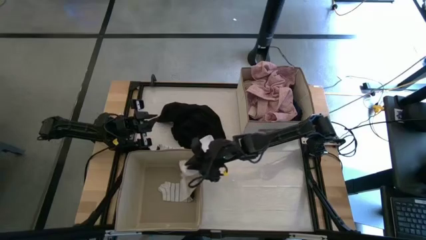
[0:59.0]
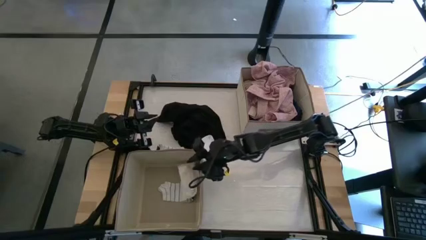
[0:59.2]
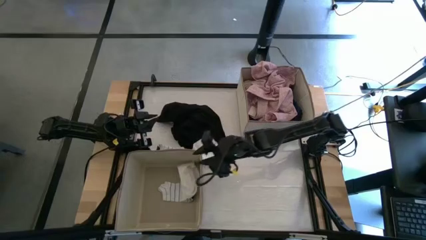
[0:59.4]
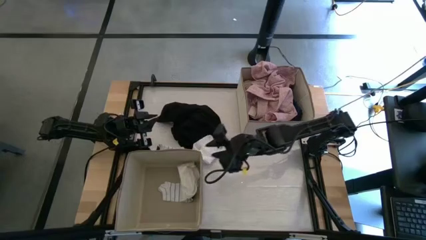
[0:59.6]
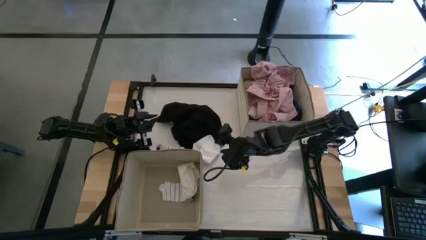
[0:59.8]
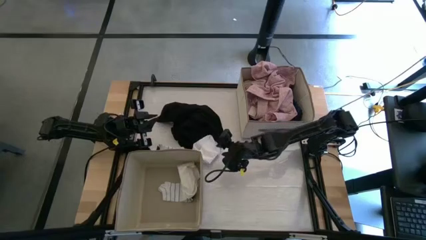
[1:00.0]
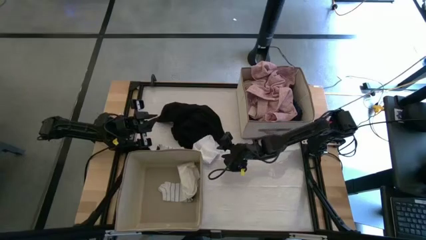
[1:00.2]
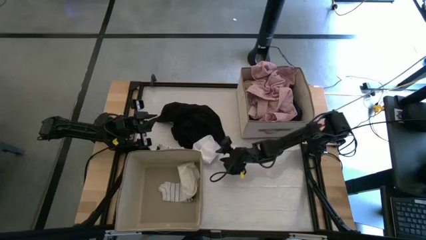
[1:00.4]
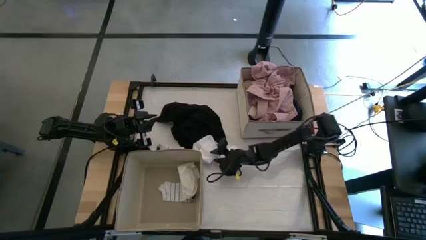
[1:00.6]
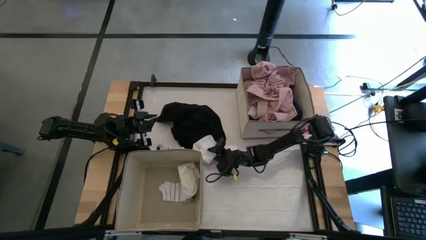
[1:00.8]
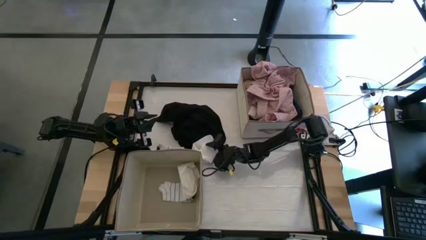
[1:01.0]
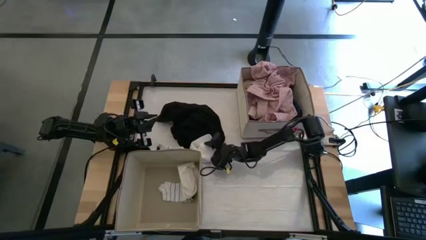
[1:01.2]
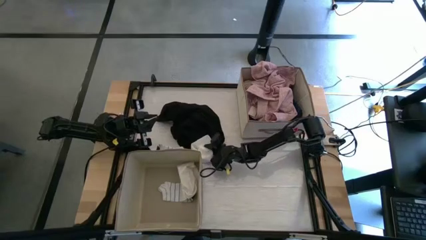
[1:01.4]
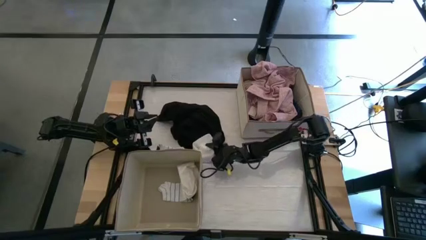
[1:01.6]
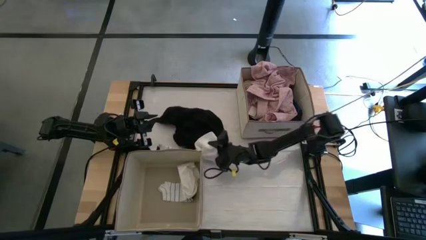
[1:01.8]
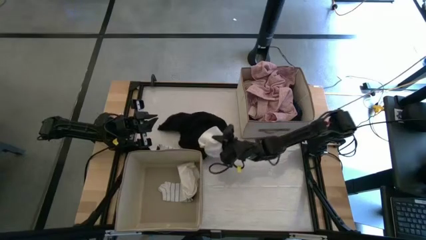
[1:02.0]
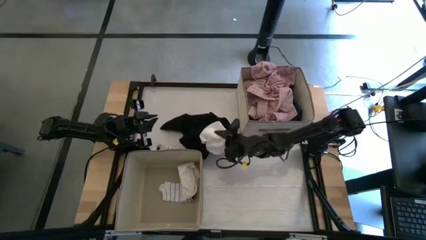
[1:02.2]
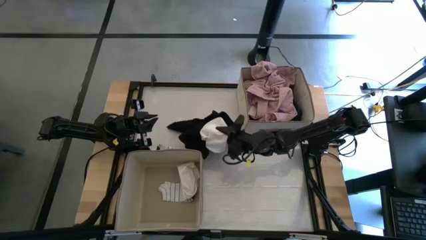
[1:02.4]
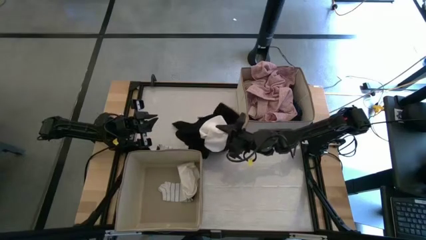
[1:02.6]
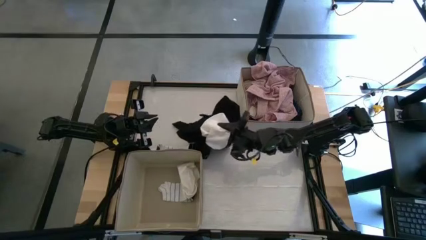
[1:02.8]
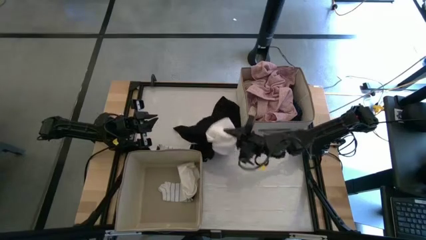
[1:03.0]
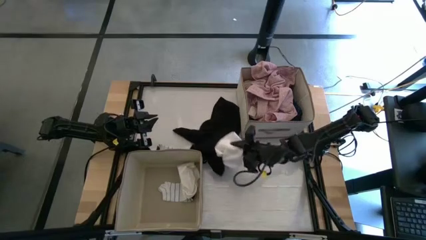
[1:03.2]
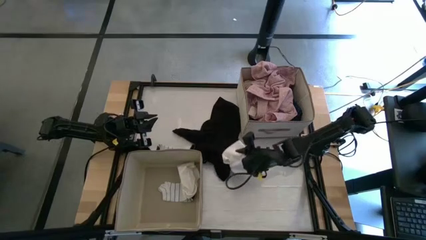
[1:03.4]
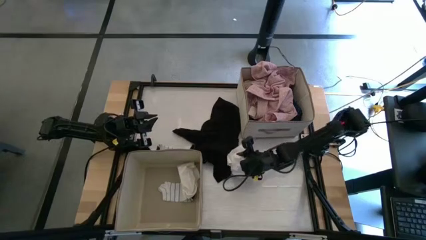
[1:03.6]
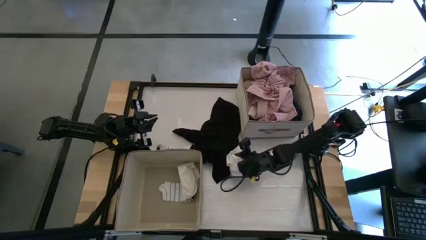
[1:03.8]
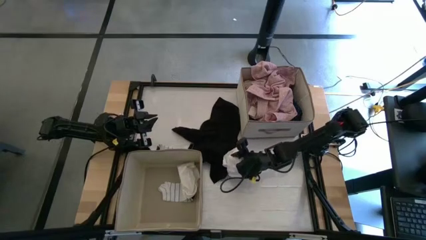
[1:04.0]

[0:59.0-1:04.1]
Task: Sort clothes
Put the white sock into the left laundry organizer

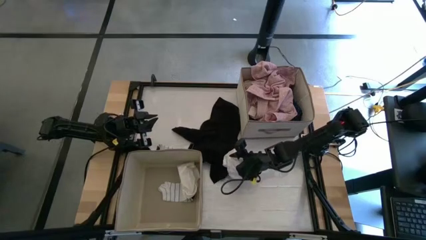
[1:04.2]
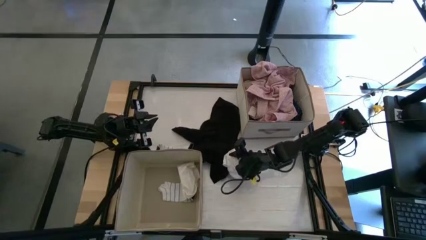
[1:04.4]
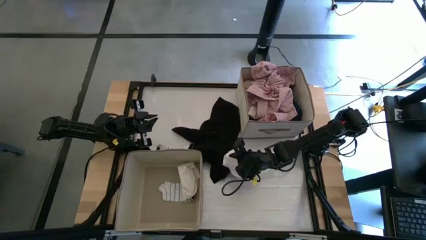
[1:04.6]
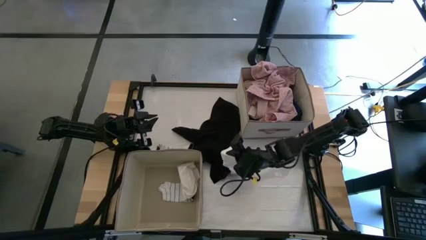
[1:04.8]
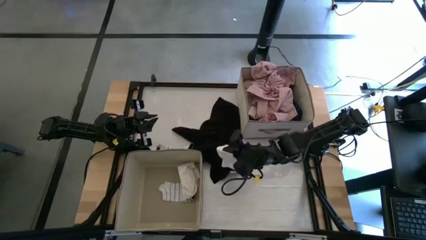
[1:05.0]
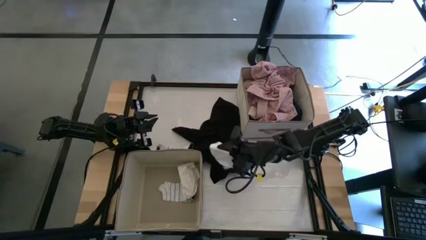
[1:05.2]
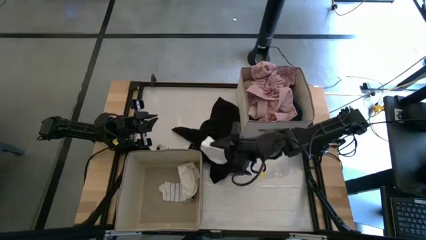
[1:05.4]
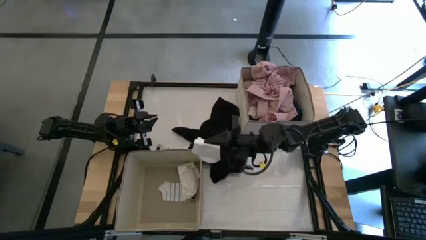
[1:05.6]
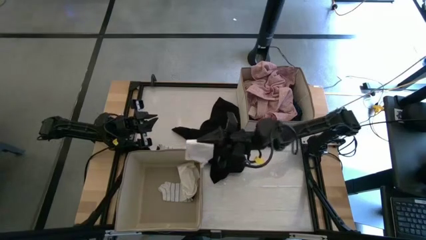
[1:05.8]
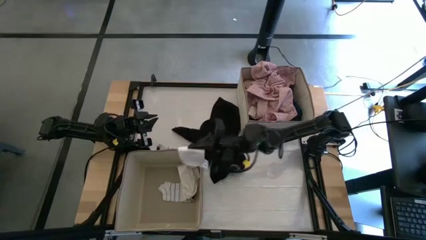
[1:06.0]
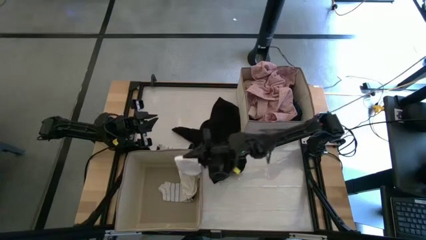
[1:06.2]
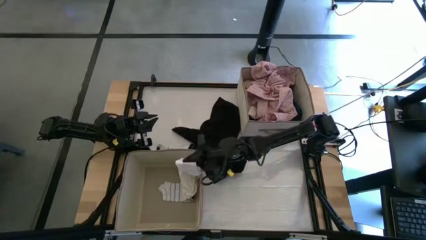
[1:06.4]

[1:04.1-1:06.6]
Put the white sock into the left laundry organizer

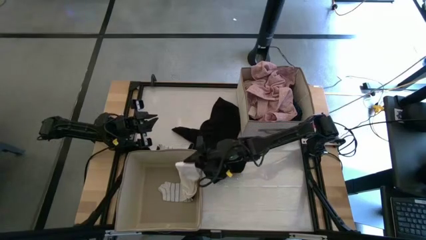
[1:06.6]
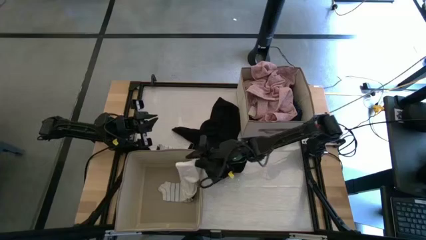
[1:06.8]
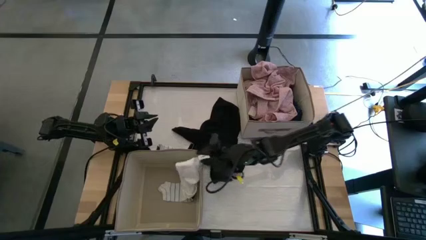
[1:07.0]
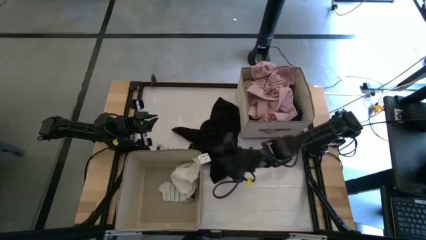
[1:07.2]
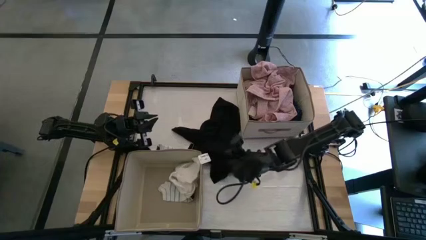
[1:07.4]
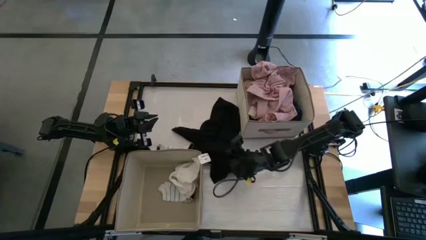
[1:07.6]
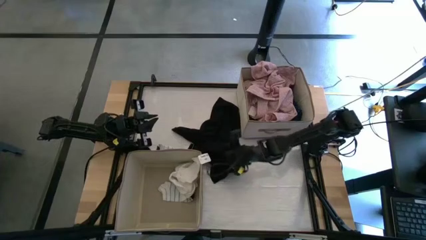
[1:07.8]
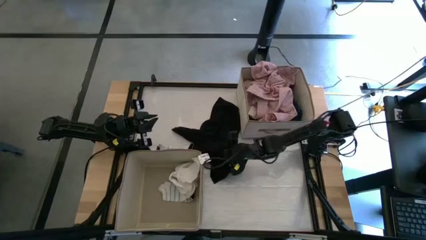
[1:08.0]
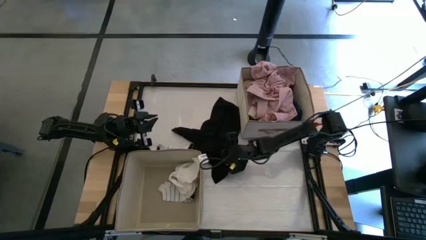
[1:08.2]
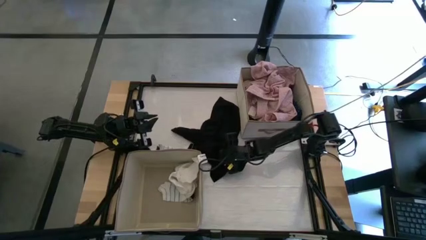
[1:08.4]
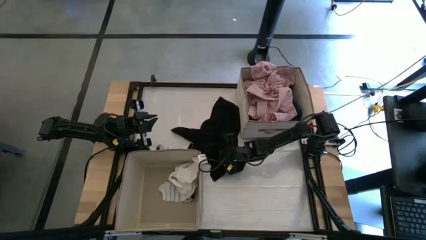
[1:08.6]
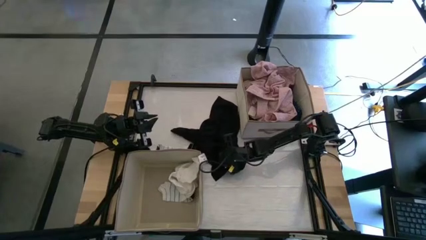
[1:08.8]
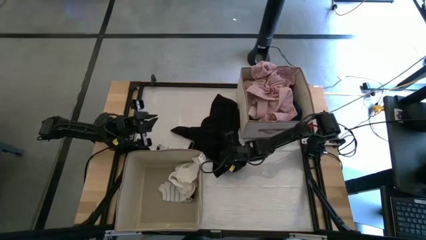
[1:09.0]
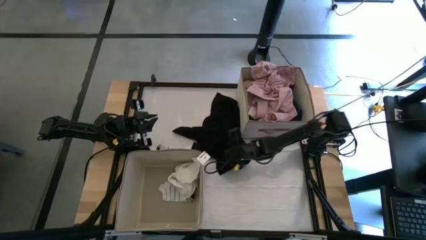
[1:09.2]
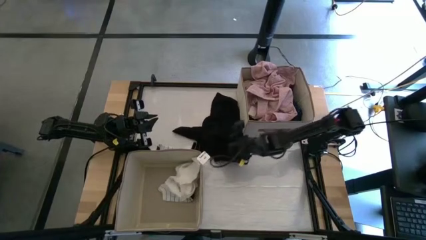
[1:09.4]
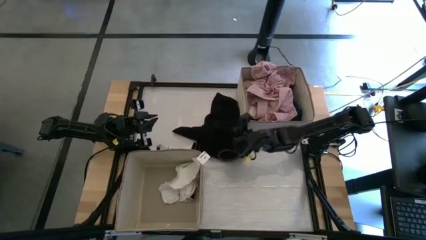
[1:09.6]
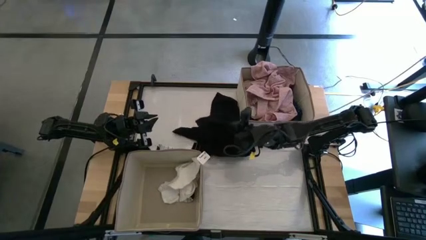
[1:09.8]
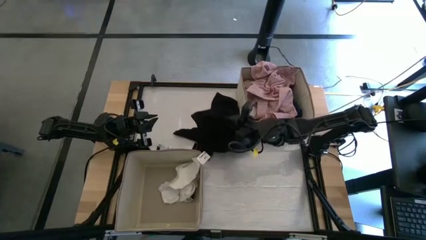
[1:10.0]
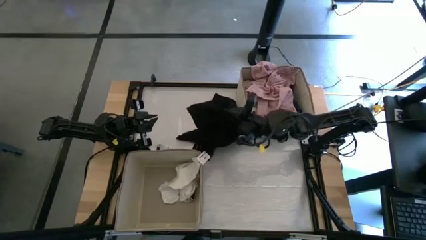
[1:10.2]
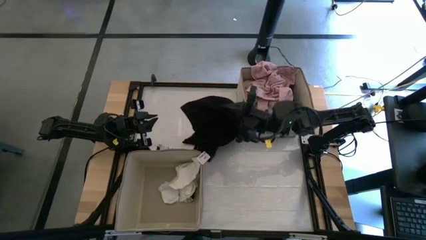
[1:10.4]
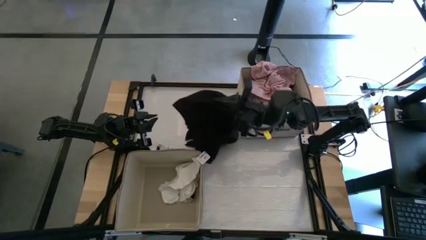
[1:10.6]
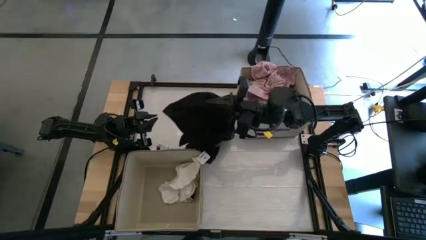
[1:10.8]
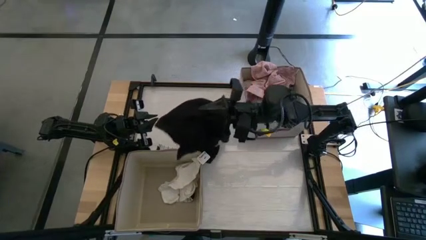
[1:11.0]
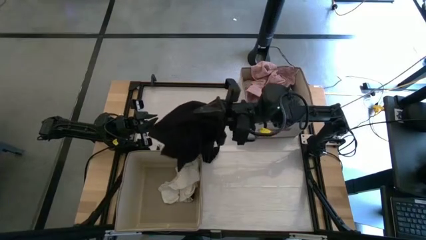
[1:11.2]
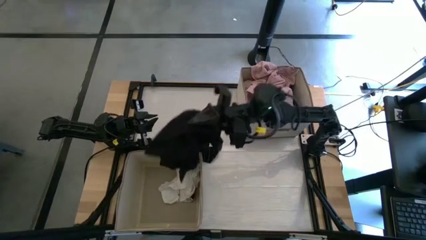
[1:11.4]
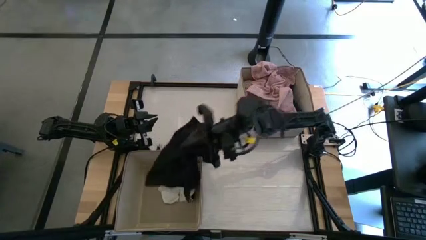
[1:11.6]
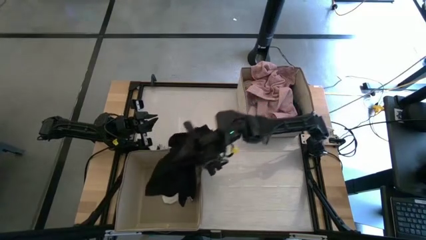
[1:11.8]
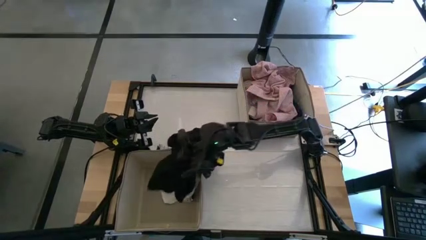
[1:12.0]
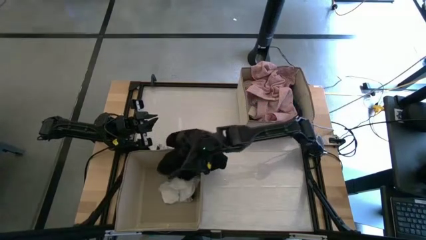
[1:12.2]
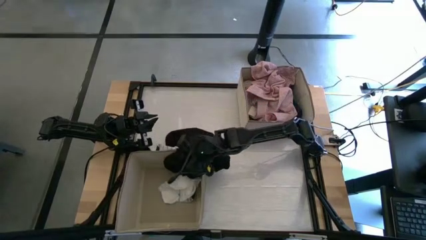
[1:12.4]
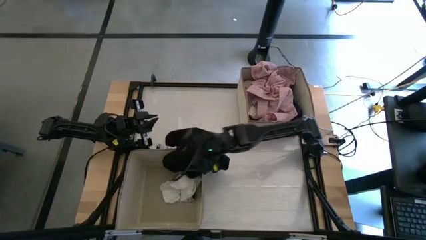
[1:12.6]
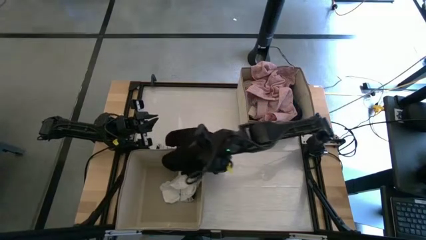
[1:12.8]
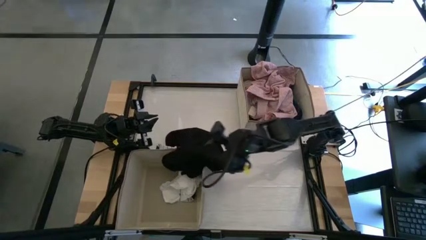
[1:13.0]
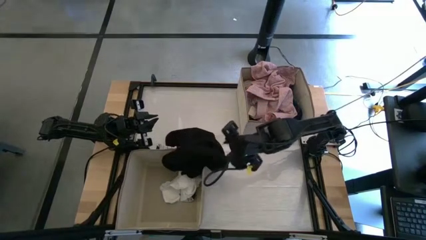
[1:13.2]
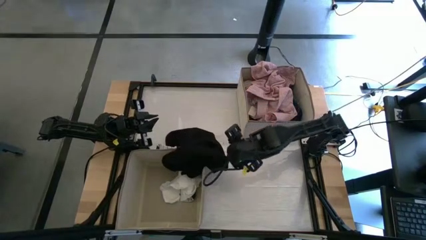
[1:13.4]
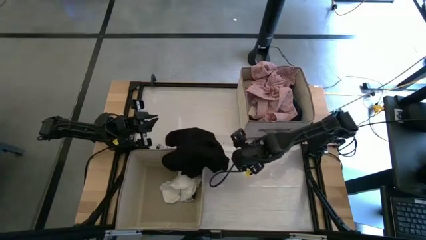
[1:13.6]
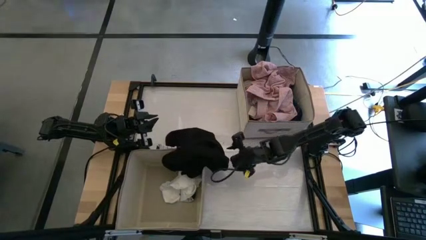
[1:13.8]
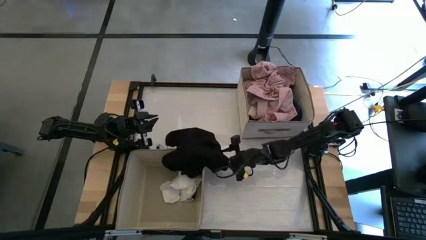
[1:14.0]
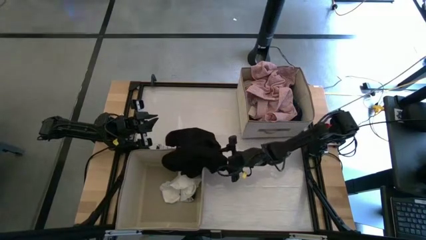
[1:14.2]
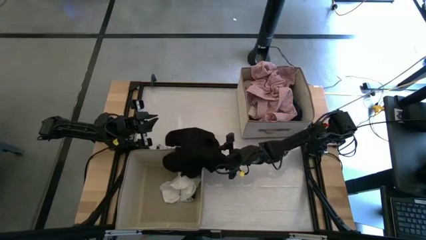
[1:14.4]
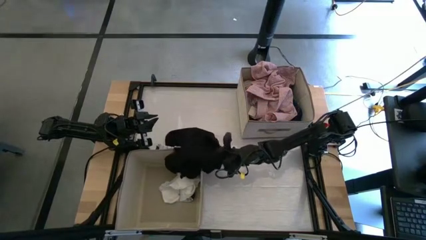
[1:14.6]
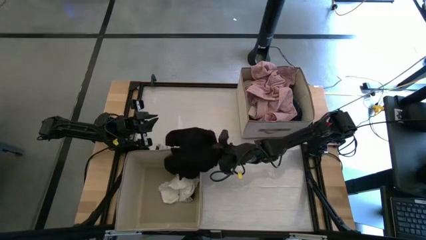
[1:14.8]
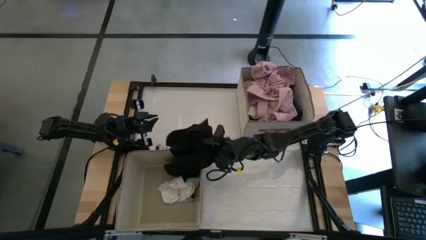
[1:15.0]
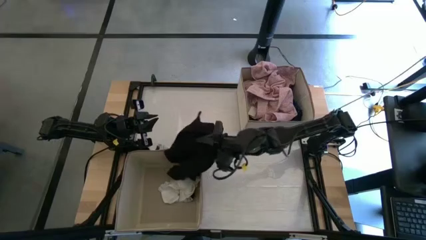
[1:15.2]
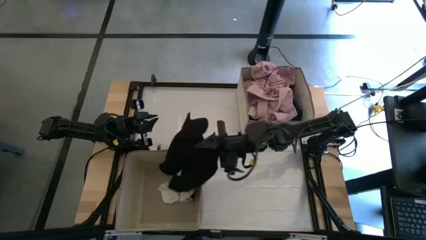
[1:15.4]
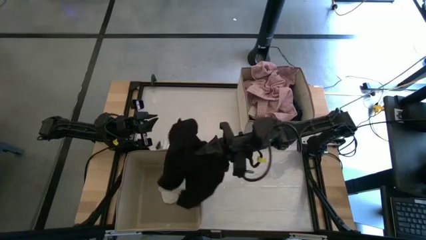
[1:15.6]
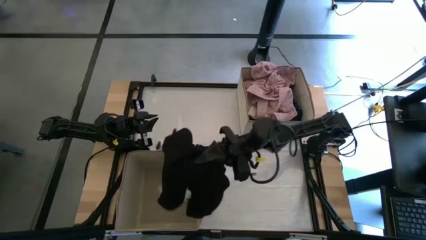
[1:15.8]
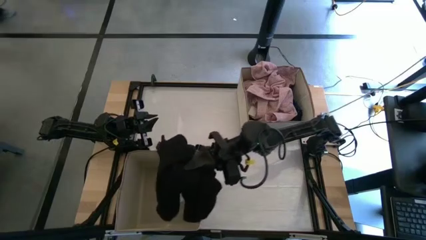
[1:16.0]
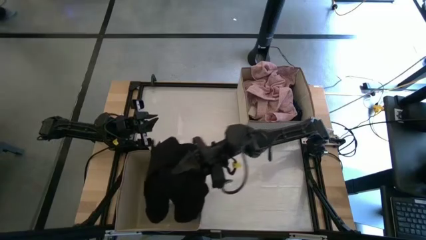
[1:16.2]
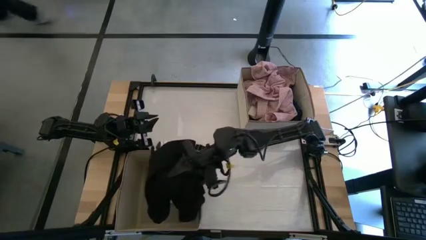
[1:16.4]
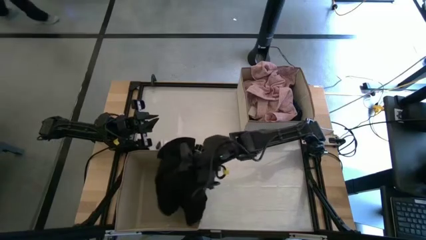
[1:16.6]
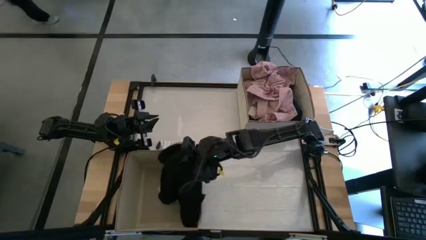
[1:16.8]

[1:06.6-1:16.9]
Put the black stocking into the left laundry organizer
